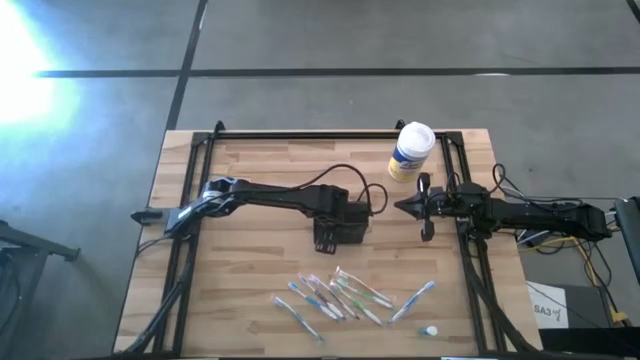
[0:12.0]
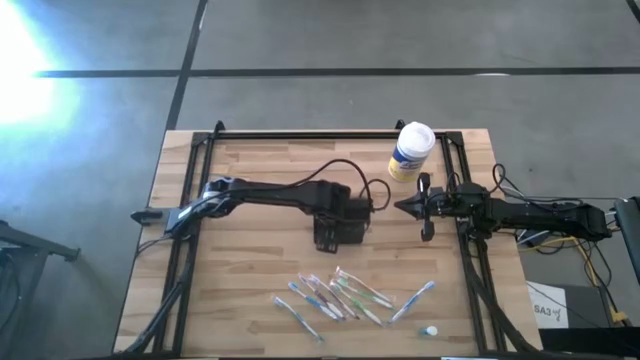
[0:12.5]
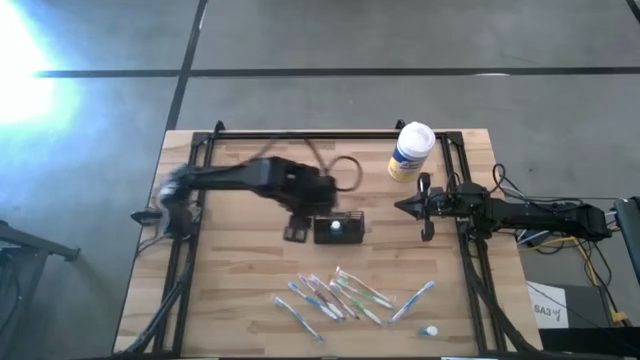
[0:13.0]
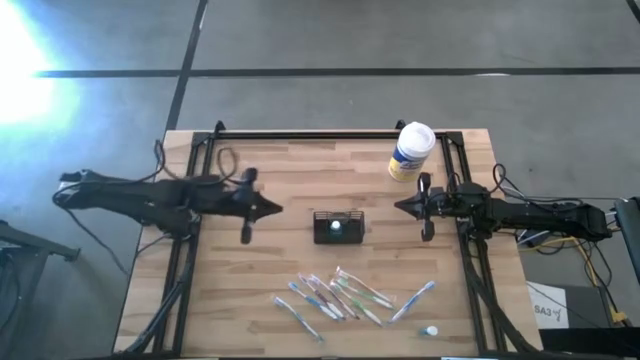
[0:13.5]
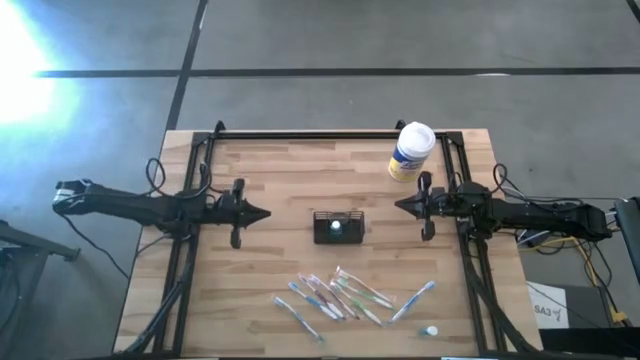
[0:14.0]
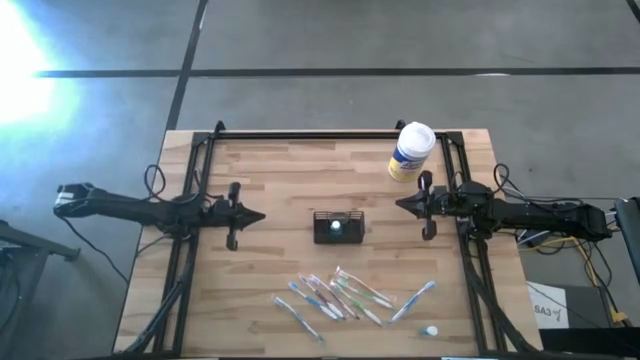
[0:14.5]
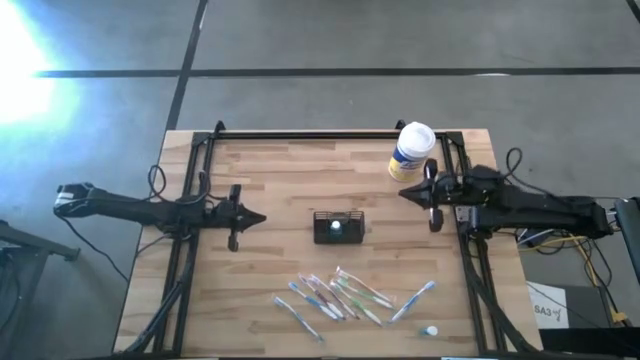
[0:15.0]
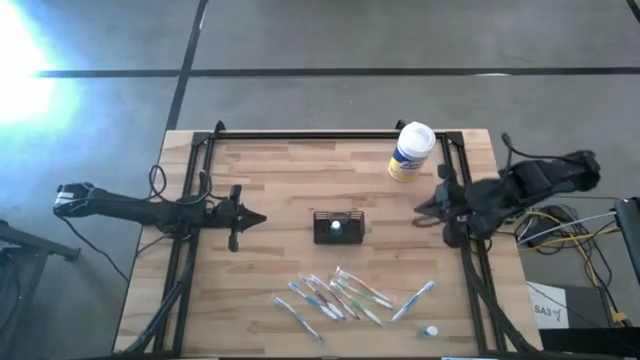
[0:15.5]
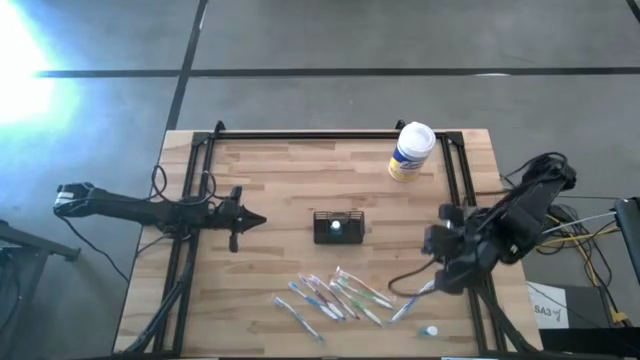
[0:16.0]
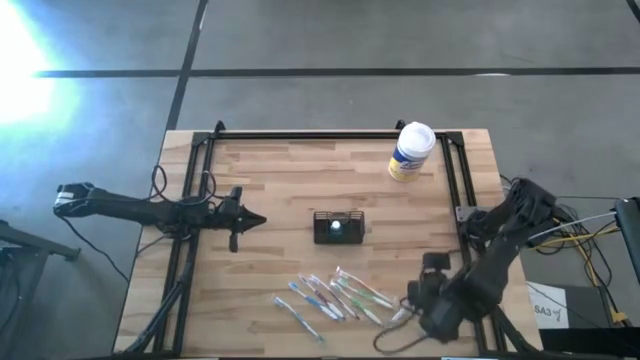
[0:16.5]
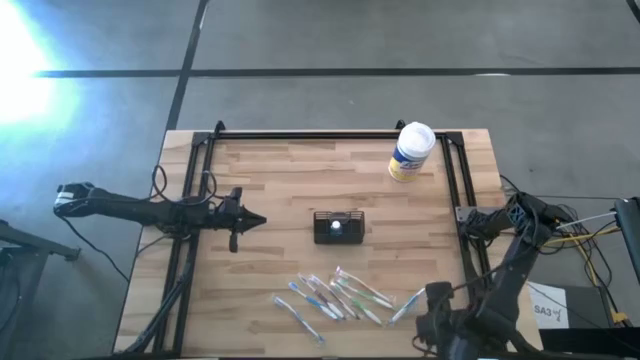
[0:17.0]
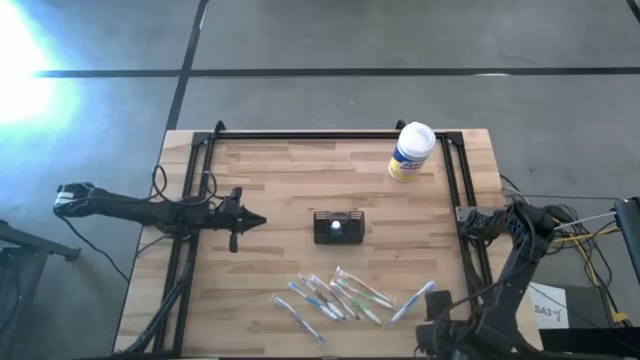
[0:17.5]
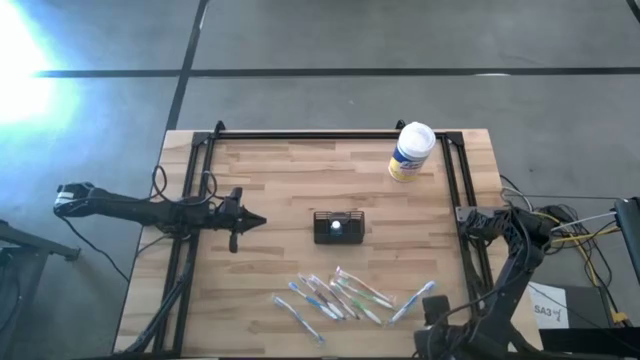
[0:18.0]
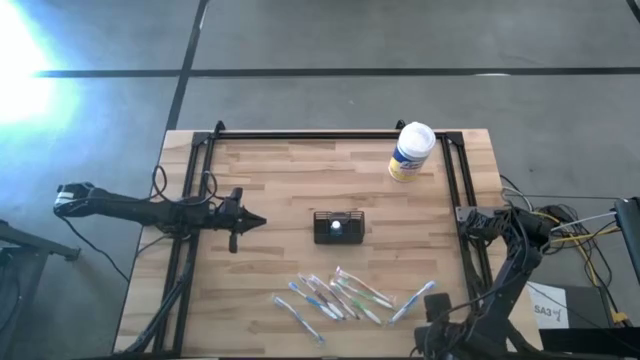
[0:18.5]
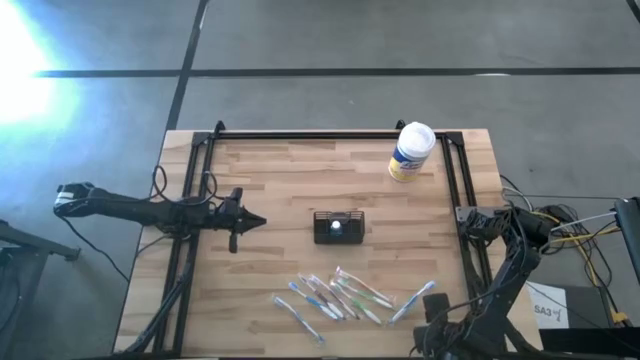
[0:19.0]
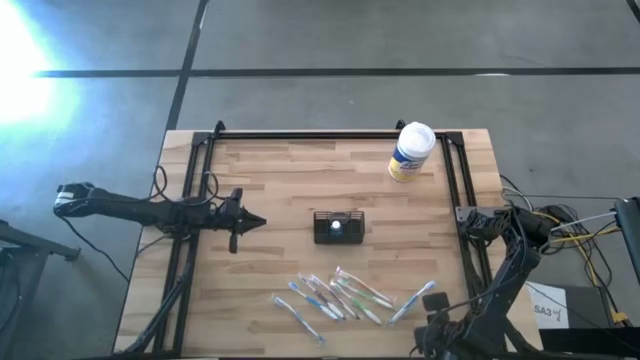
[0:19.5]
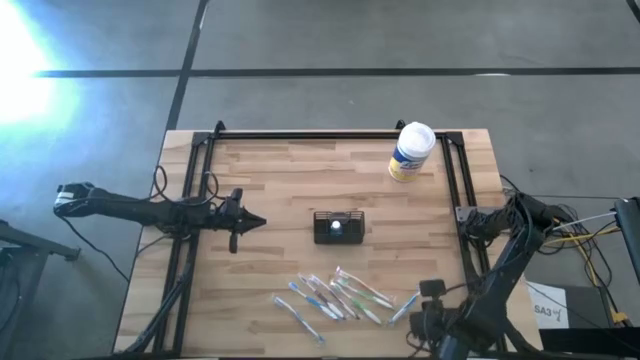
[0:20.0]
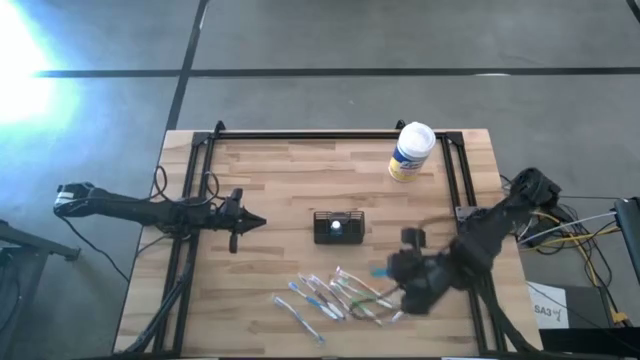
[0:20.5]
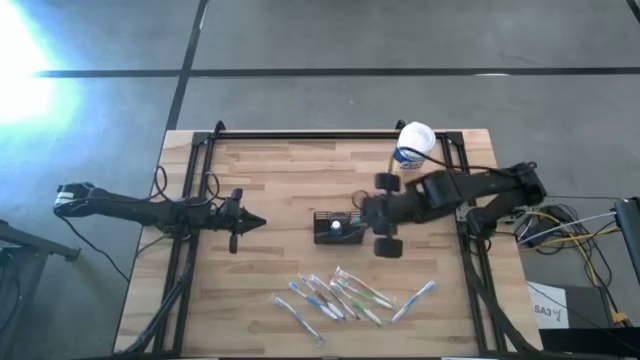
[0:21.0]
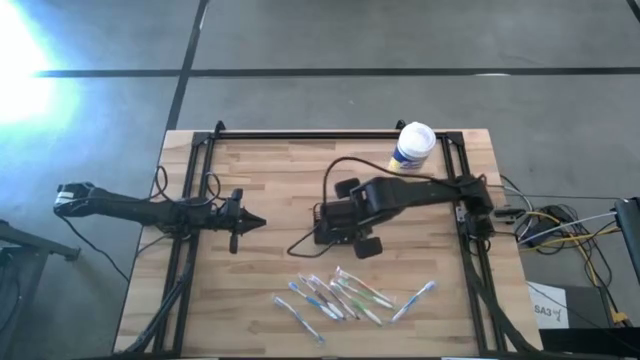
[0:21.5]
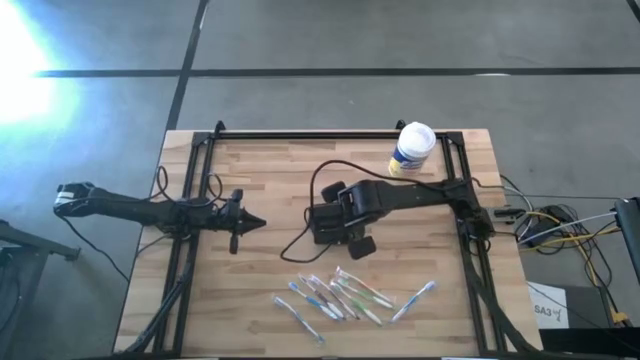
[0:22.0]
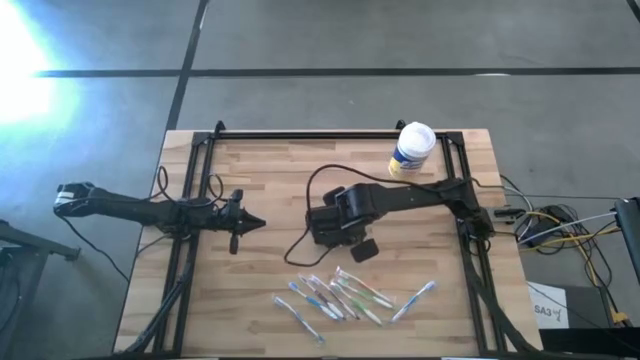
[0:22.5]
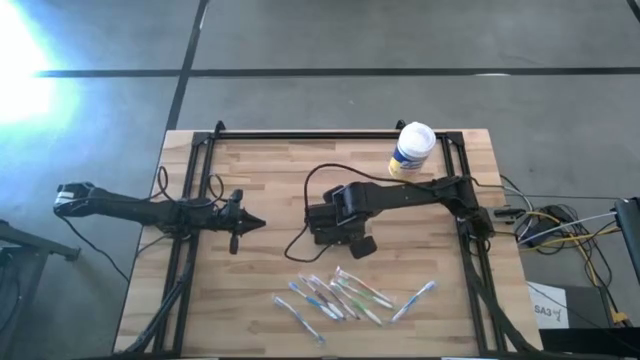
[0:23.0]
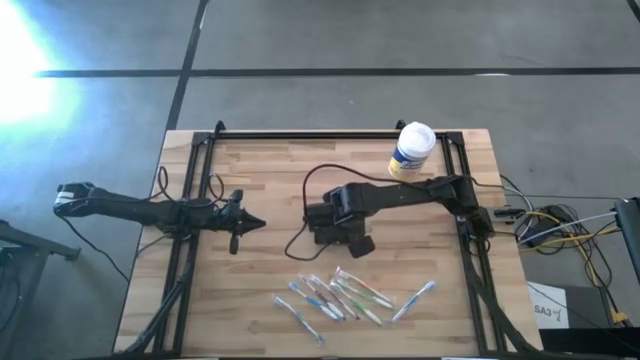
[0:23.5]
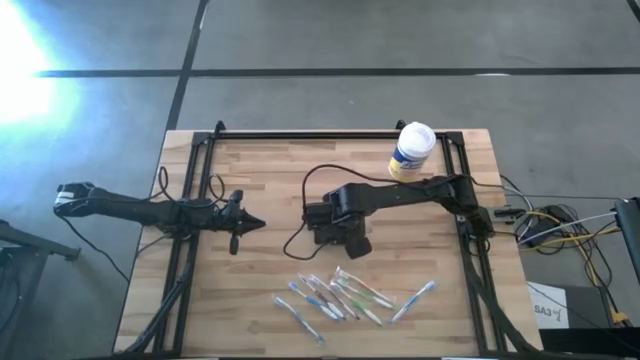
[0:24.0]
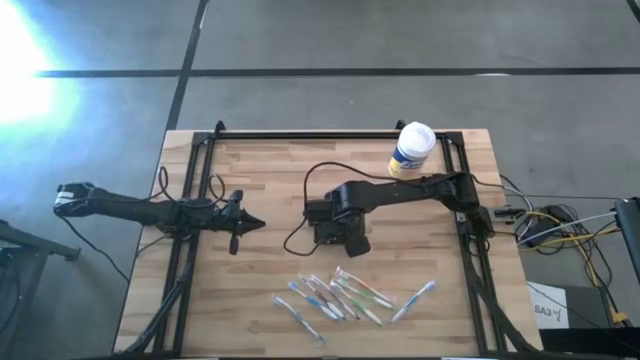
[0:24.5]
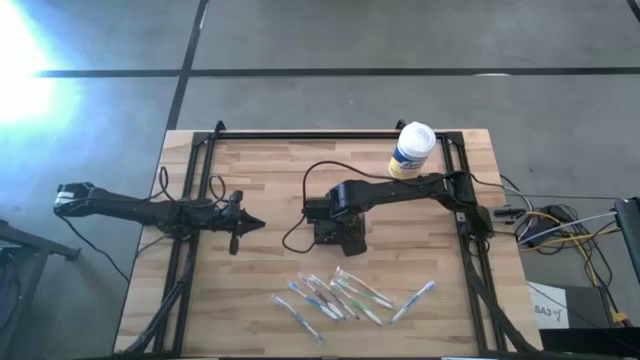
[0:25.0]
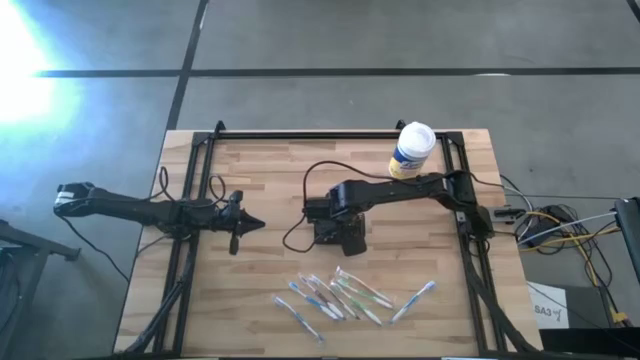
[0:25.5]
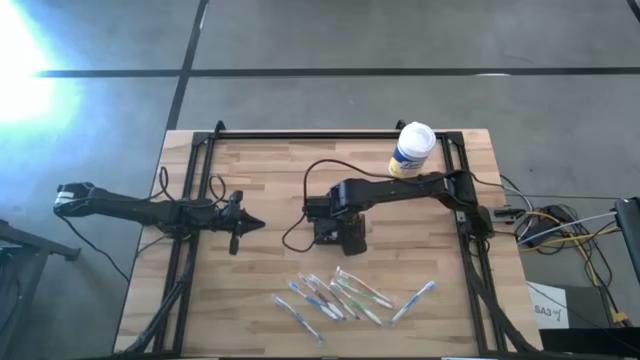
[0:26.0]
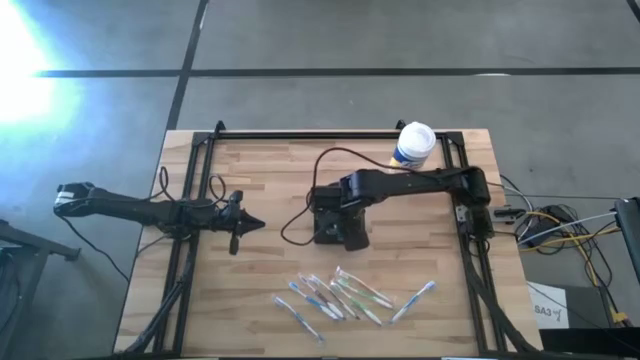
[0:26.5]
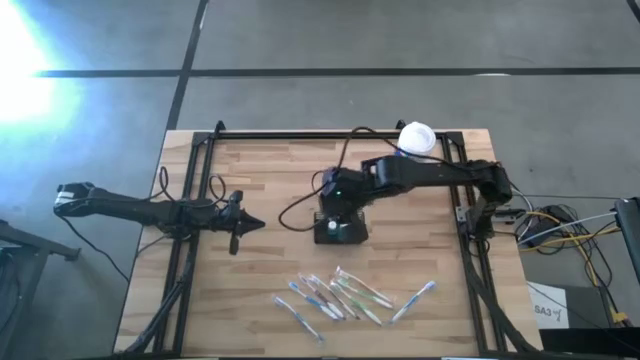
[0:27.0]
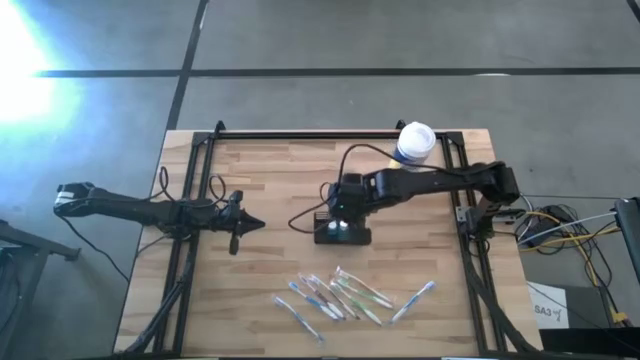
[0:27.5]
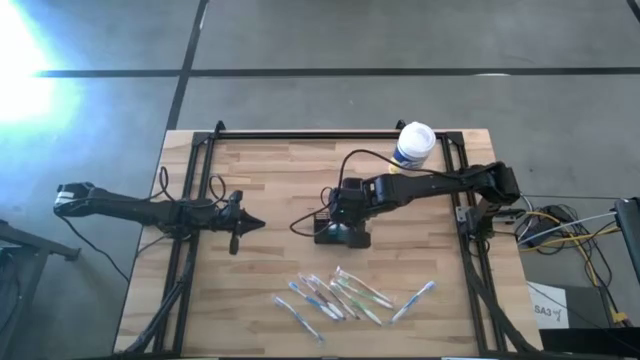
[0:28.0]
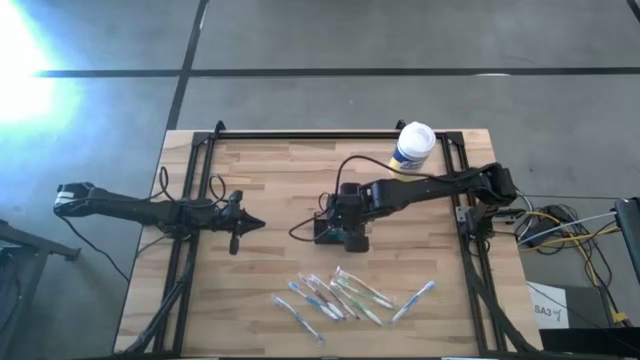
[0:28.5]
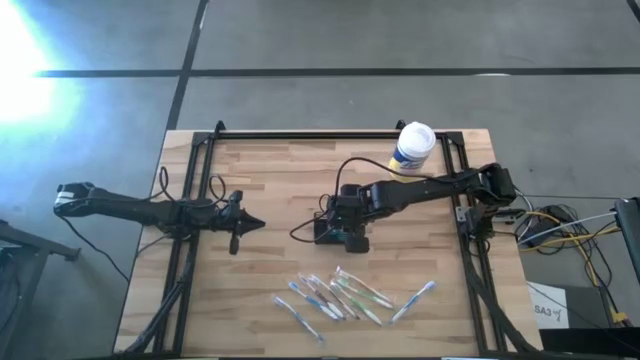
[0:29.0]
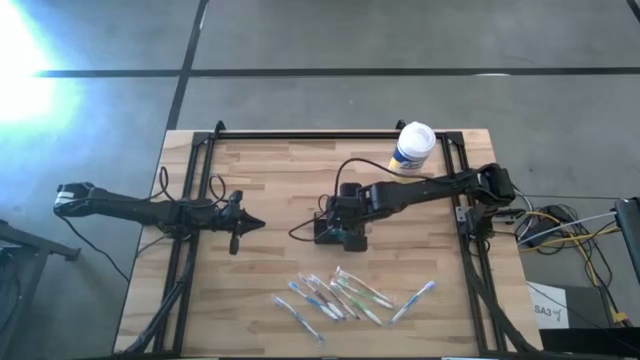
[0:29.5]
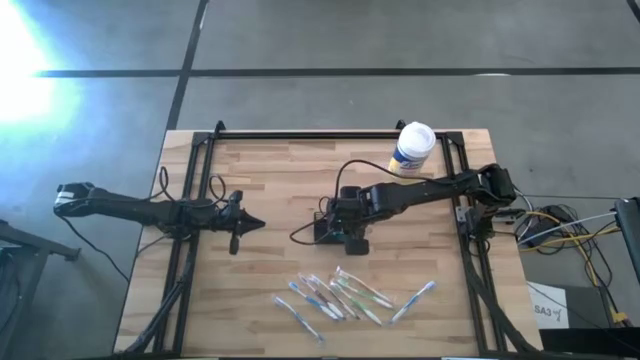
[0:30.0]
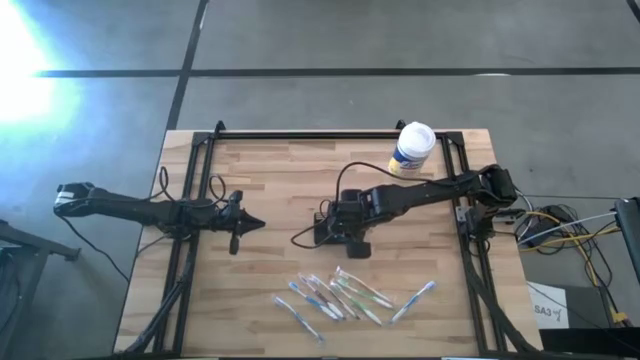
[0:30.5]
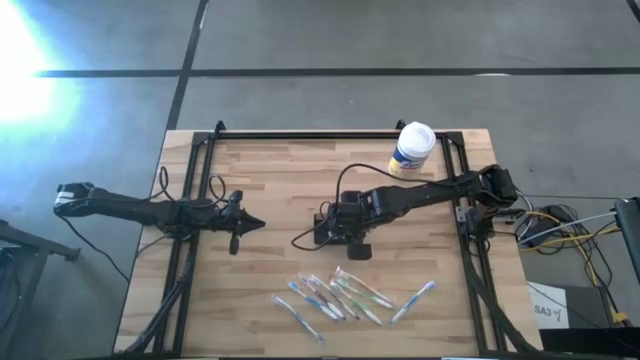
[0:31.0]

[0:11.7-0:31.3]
Task: Pick & Place toothbrushing station
Put the blue mouthwash into the black mesh organizer

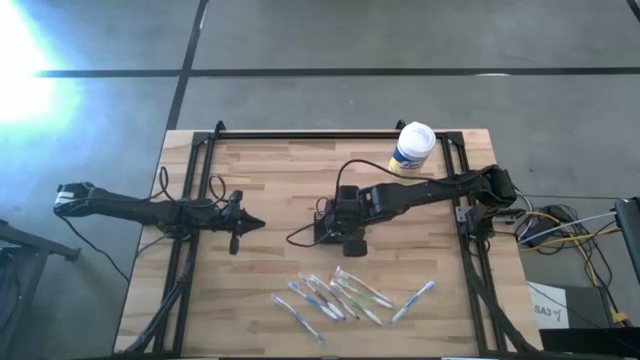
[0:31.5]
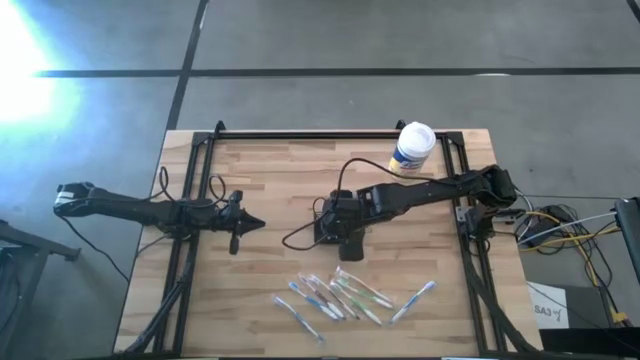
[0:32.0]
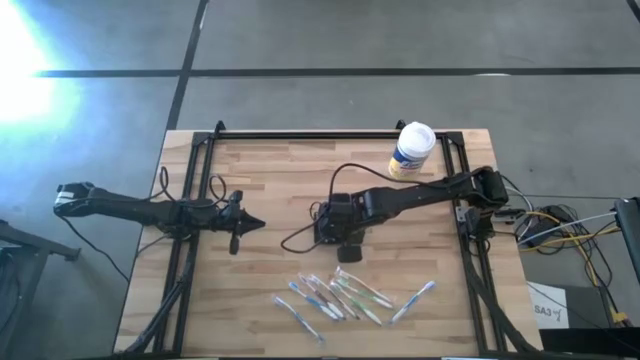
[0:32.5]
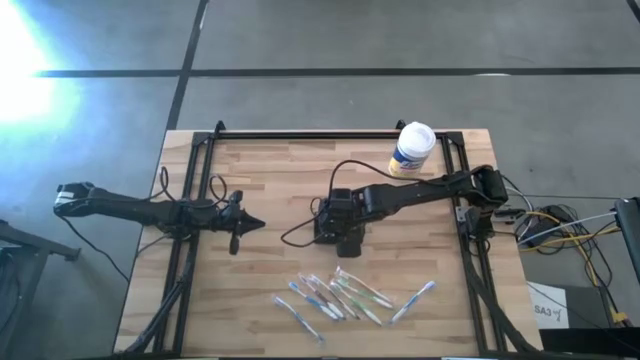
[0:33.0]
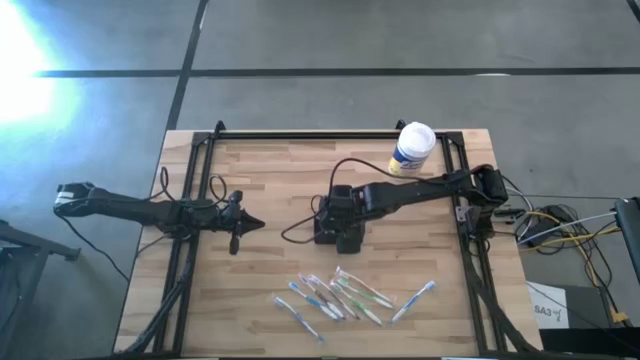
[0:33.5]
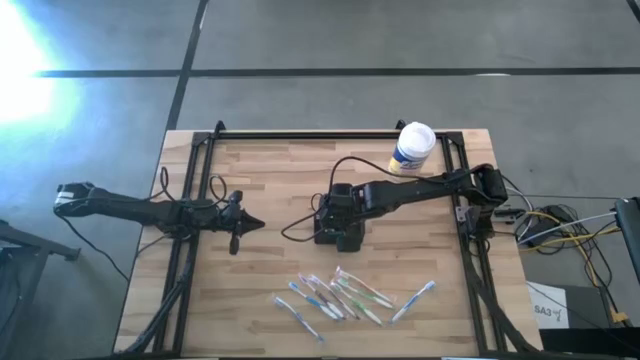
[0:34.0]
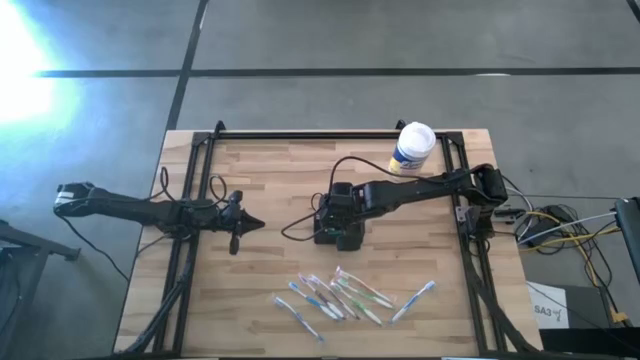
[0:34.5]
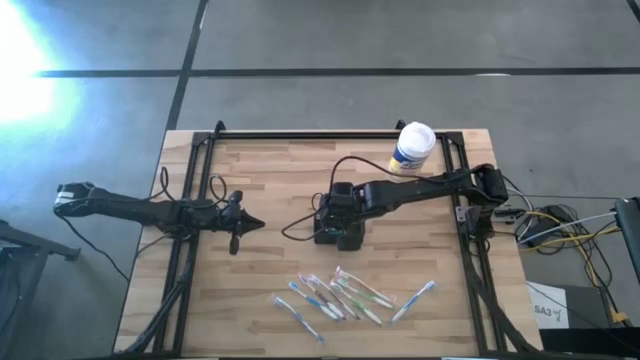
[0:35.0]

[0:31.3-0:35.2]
Adjust the blue mouthwash in the black mesh organizer
